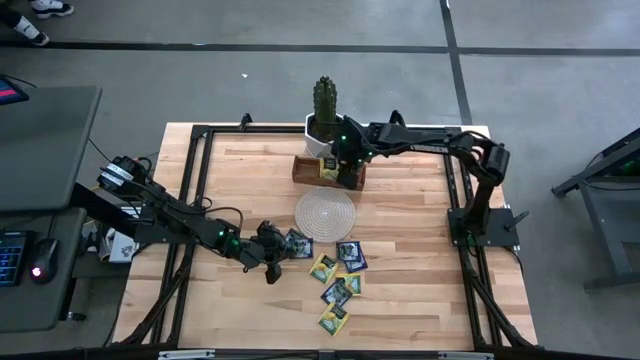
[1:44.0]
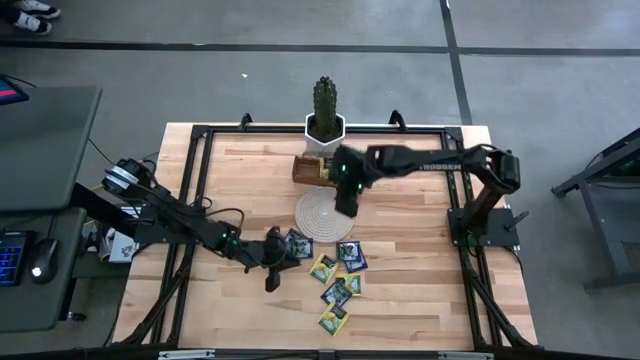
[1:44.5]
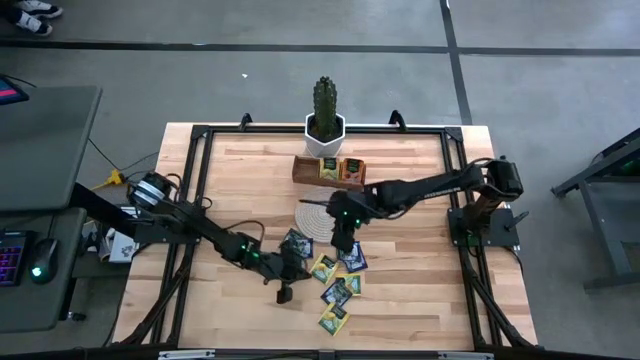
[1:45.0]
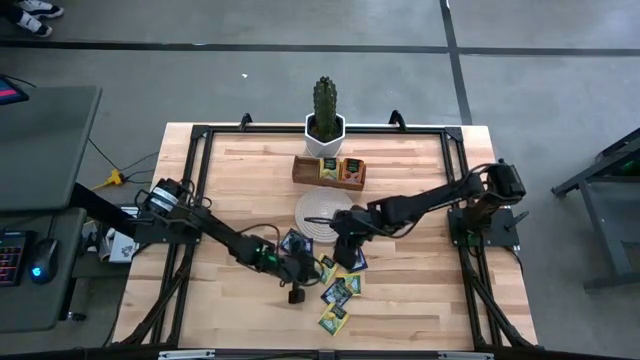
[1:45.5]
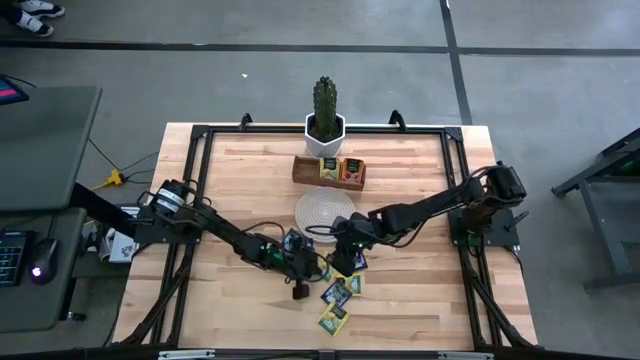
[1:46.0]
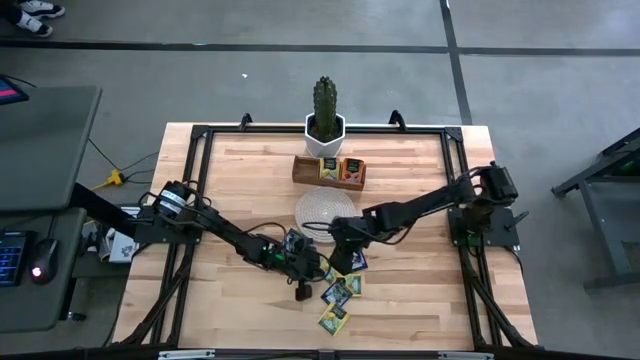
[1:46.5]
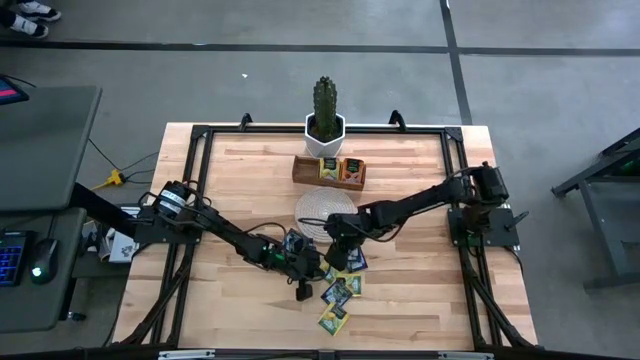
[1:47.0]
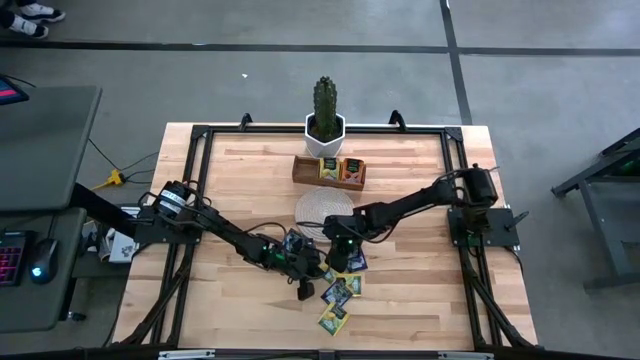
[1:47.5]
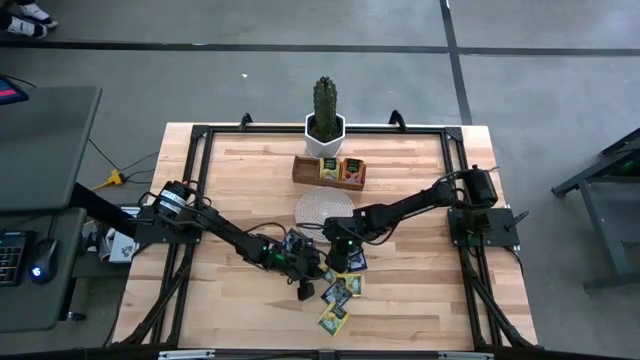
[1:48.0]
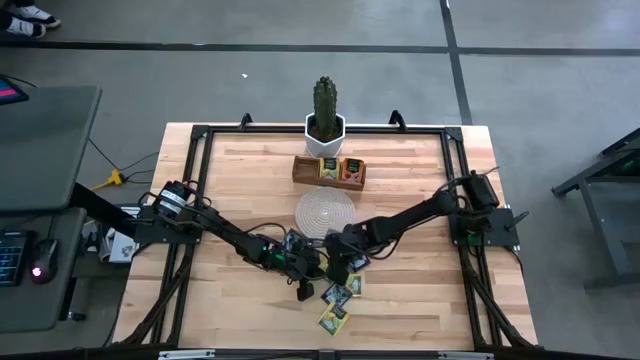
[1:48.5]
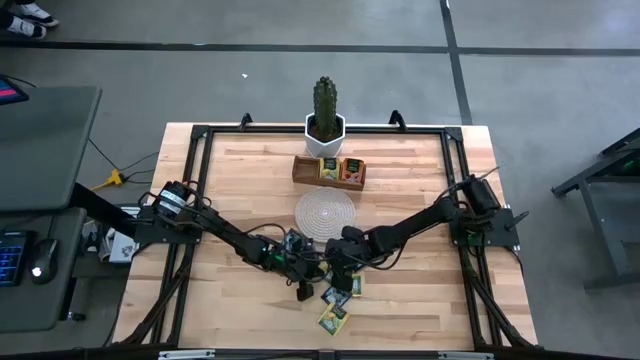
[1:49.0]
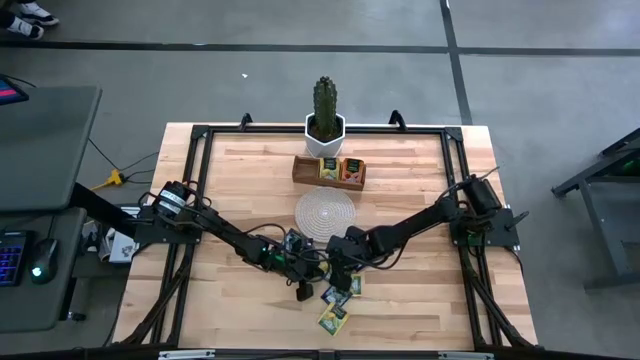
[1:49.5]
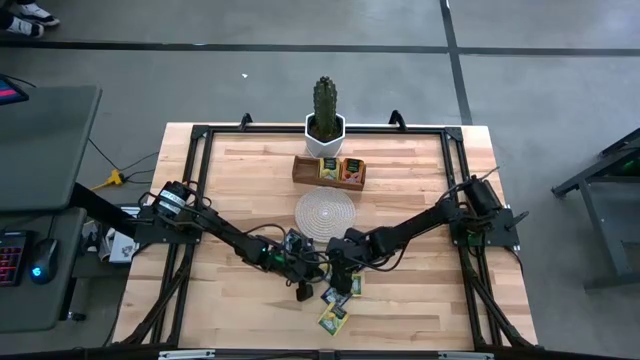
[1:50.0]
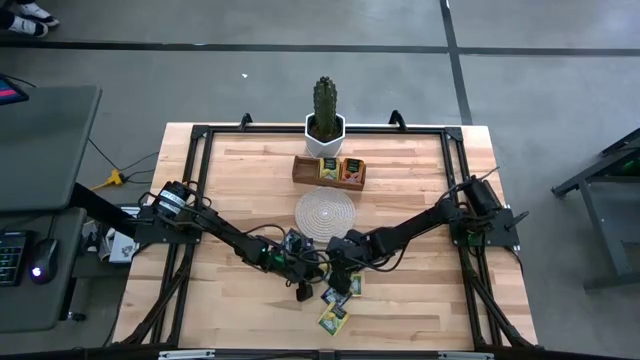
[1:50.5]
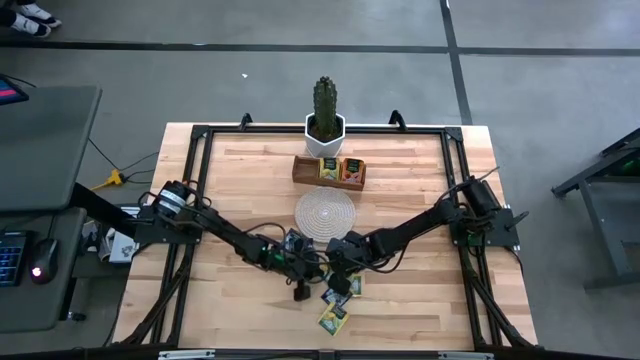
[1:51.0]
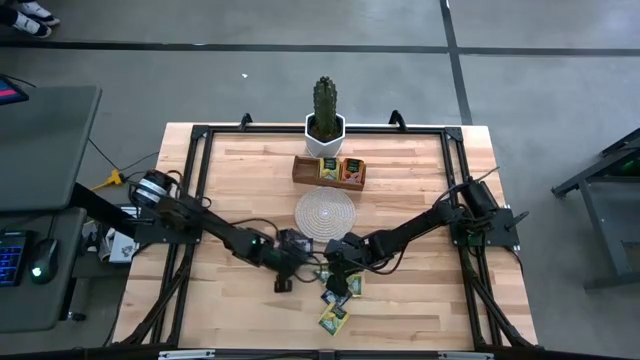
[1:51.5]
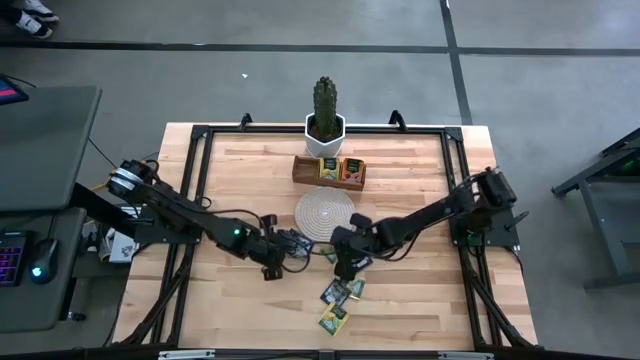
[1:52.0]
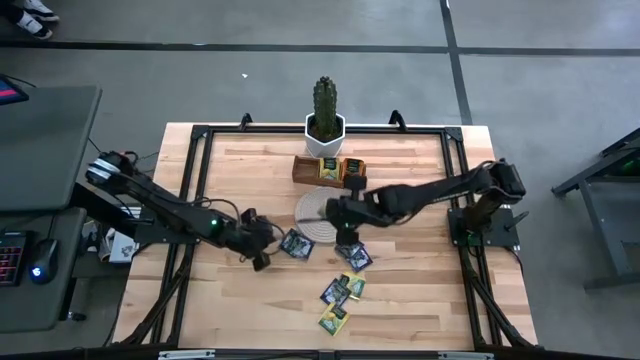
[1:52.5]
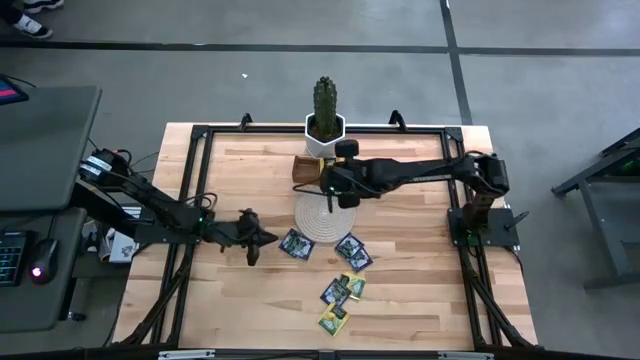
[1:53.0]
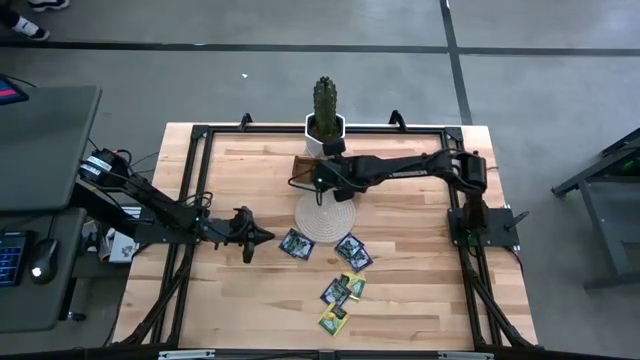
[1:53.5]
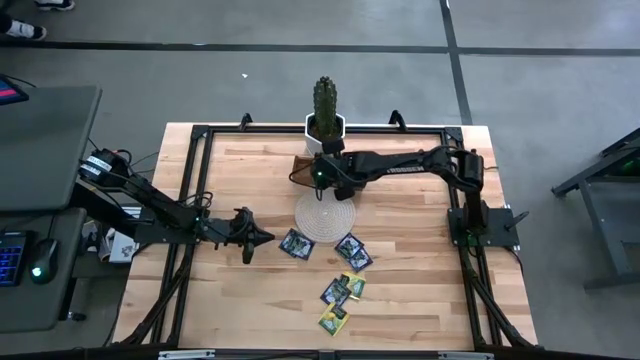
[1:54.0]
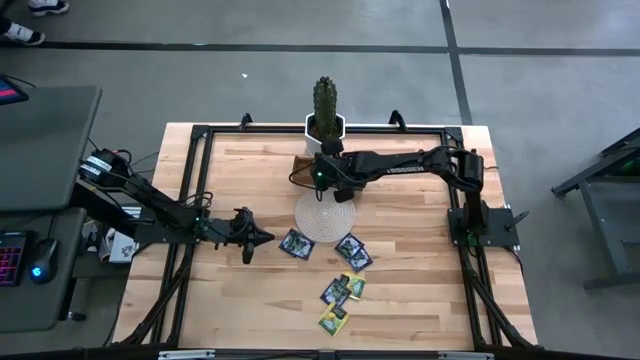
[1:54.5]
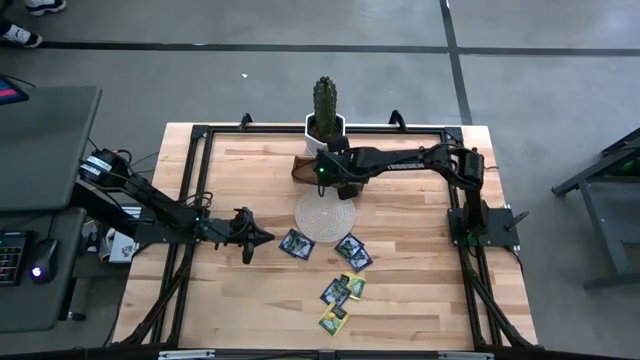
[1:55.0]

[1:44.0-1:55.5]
Task: Pick & Place Tea
Put the yellow tea bag into the middle section of the wooden organizer

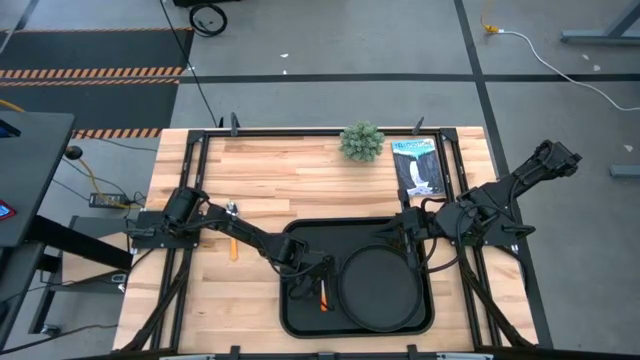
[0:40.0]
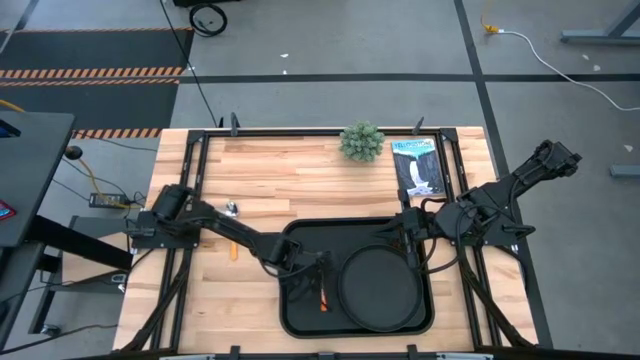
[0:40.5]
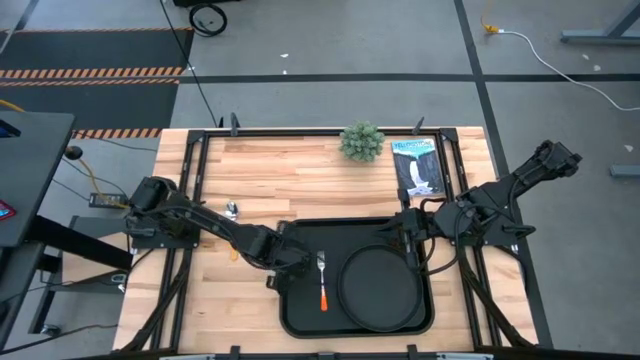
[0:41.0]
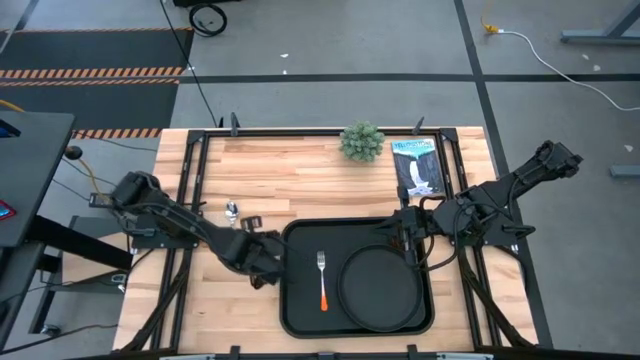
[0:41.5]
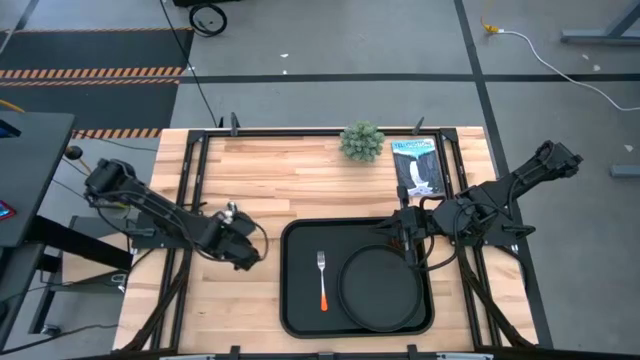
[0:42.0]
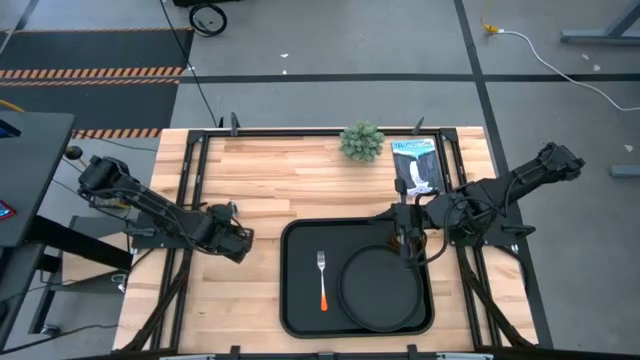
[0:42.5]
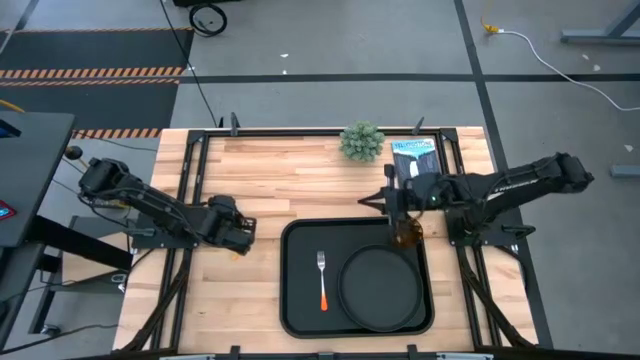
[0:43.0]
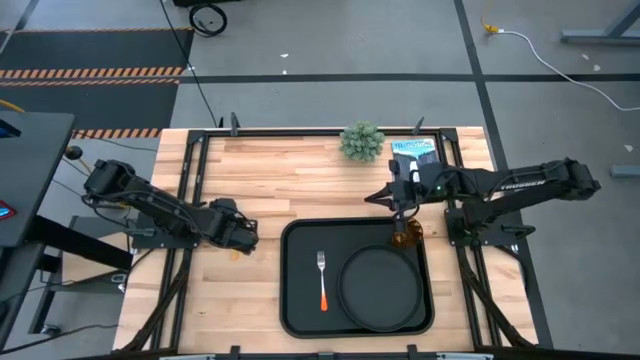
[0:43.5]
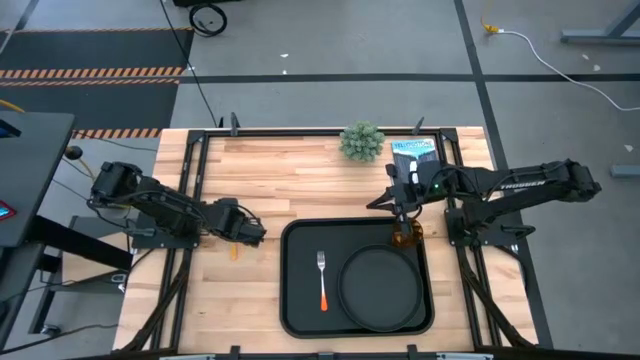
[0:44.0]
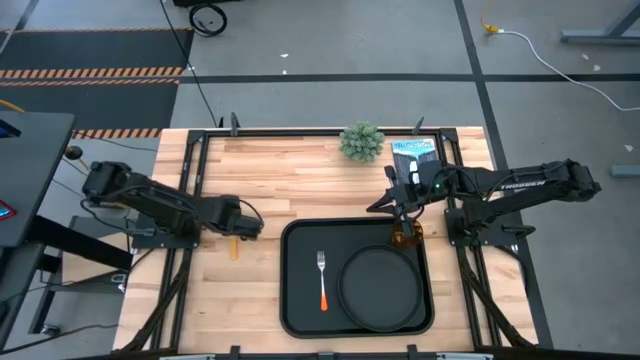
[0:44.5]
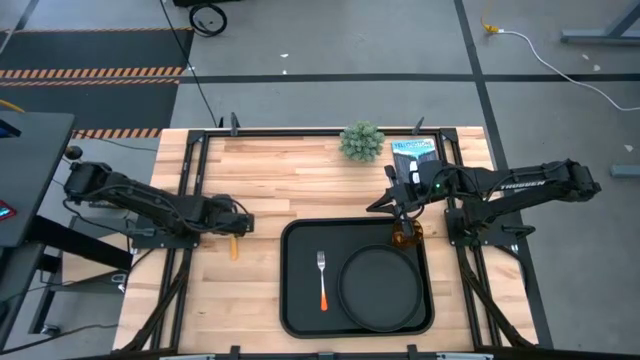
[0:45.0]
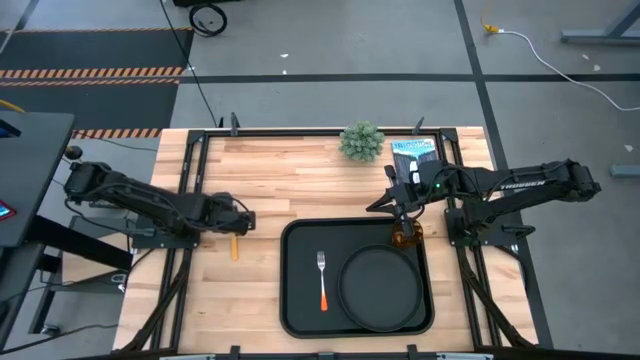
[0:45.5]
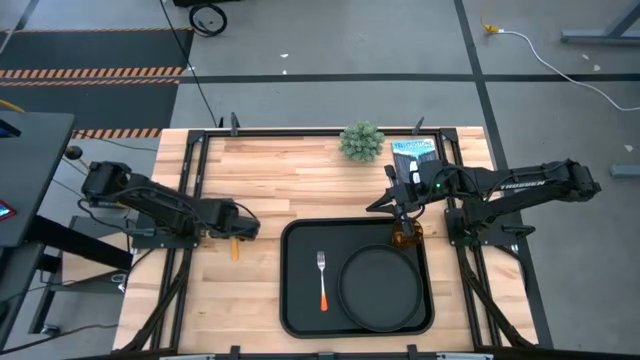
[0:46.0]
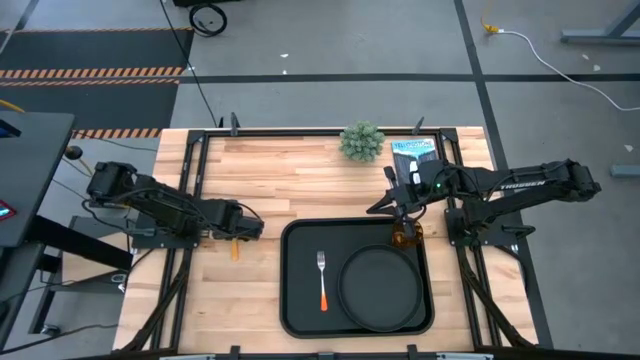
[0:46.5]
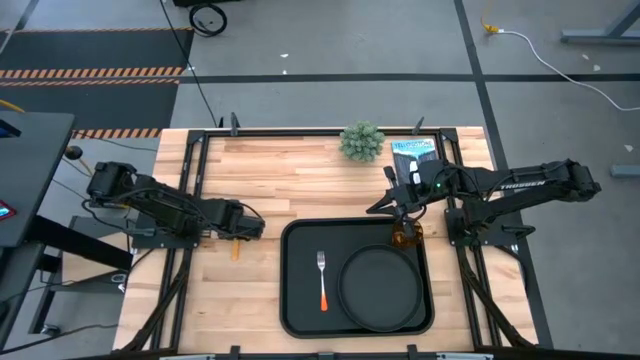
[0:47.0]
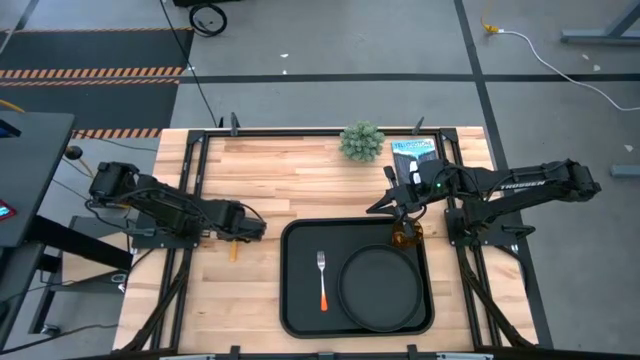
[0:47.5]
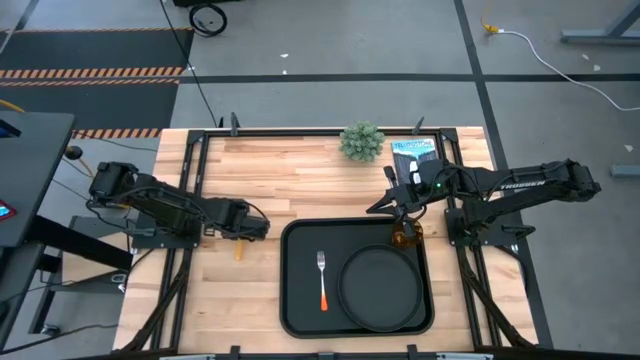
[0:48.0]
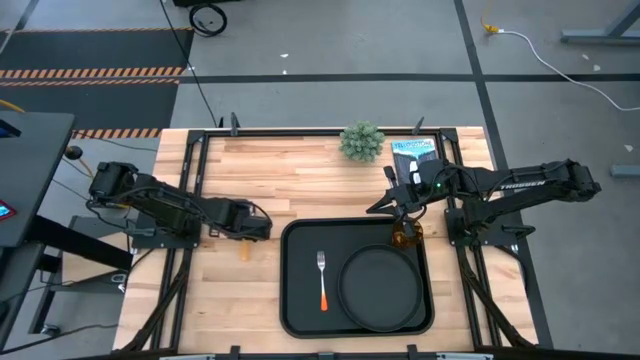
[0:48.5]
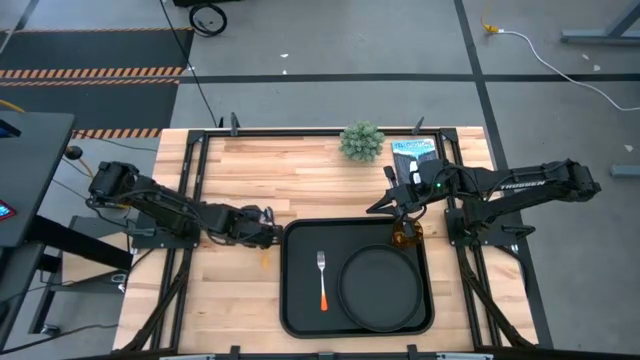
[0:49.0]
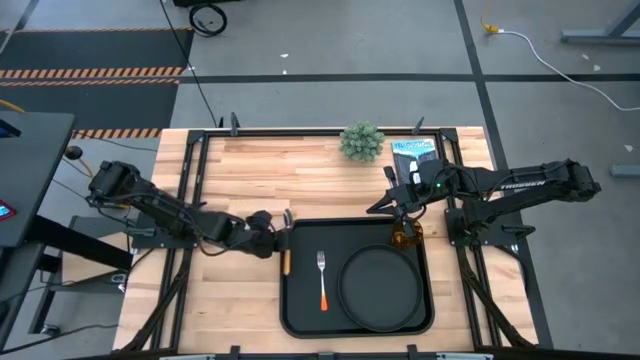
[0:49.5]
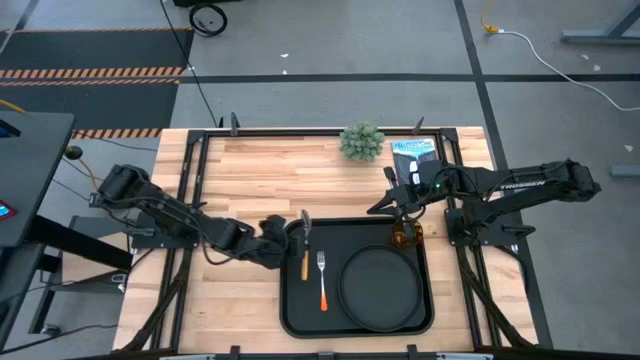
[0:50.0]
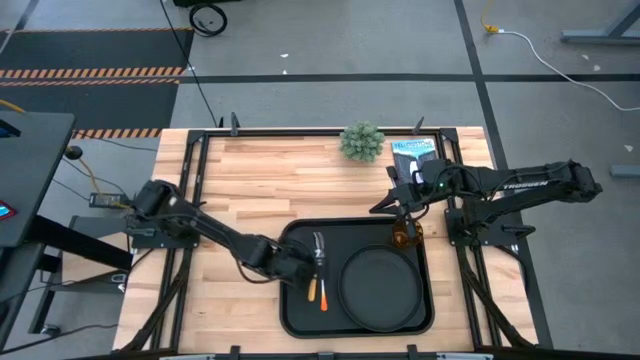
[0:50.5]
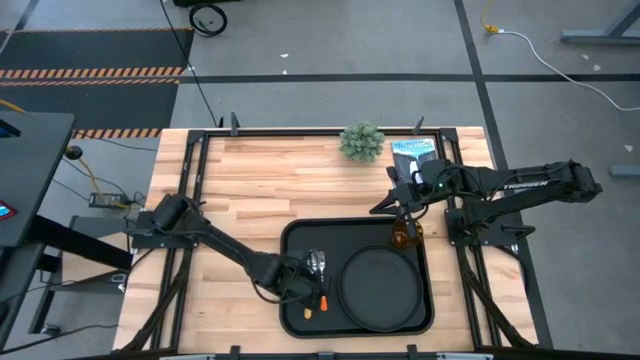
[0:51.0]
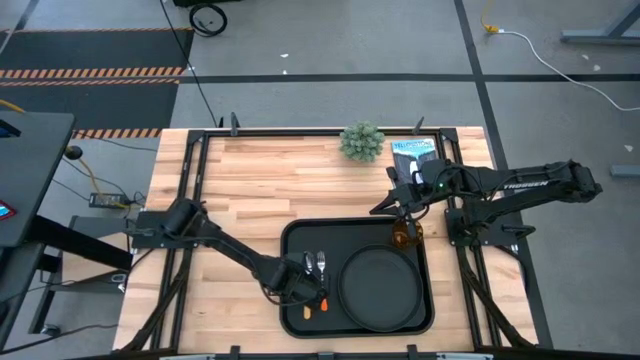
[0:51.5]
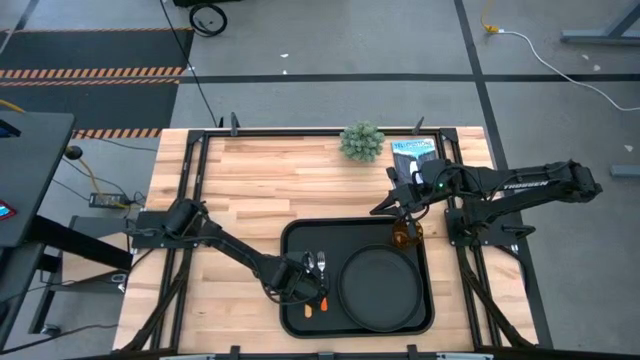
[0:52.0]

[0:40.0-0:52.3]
Task: Pick and place plate/cup/fork/spoon on tray
Put the light yellow spoon to the left of the orange fork on the black serving tray
